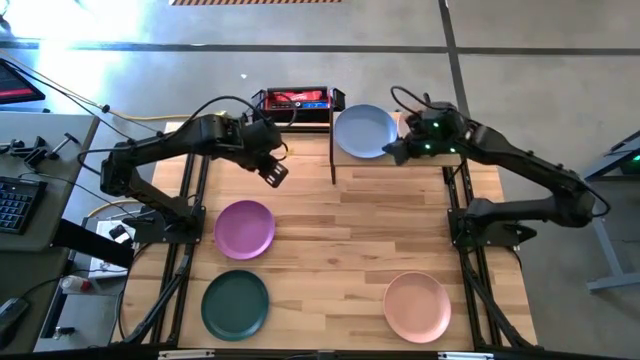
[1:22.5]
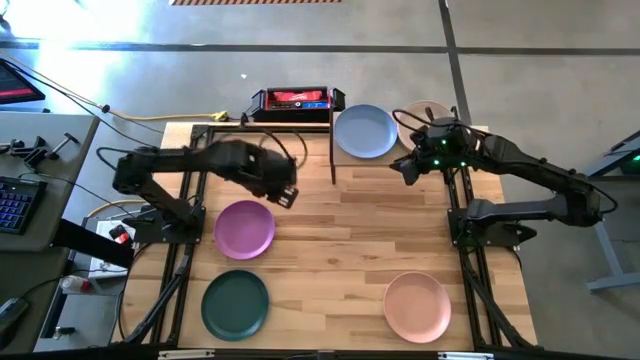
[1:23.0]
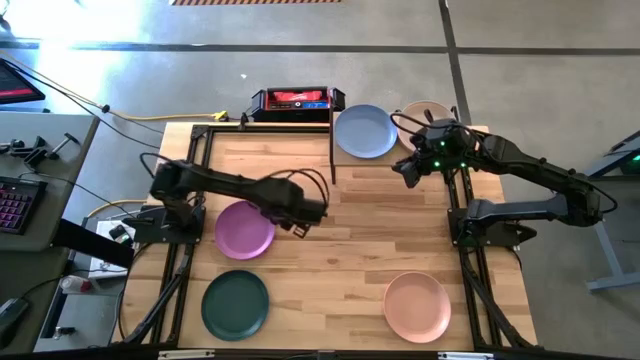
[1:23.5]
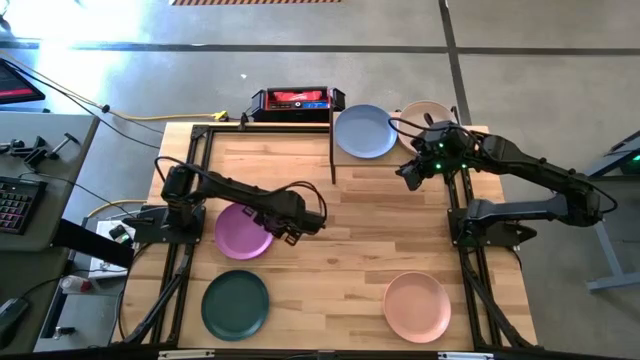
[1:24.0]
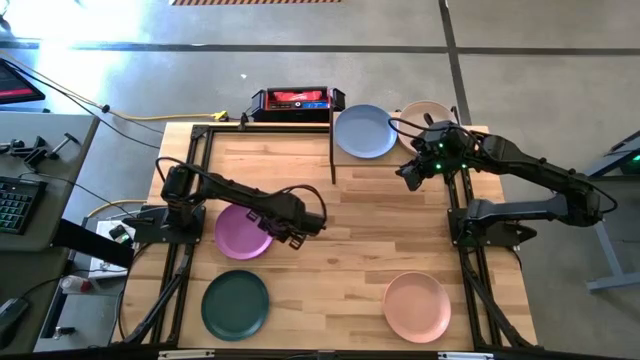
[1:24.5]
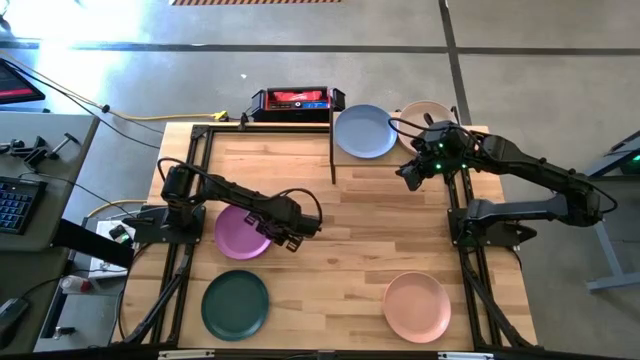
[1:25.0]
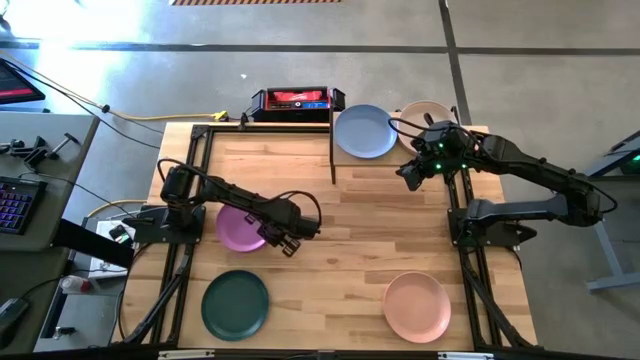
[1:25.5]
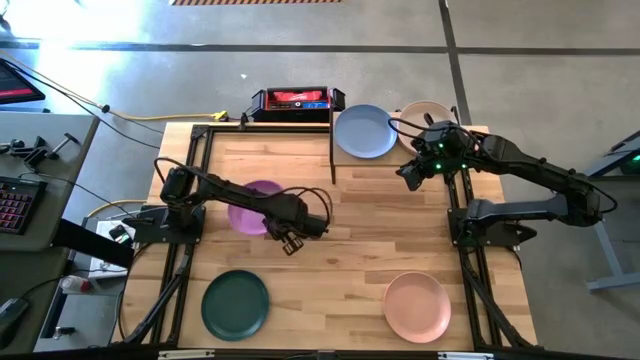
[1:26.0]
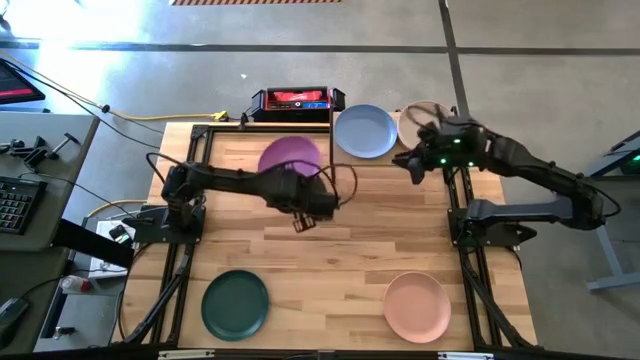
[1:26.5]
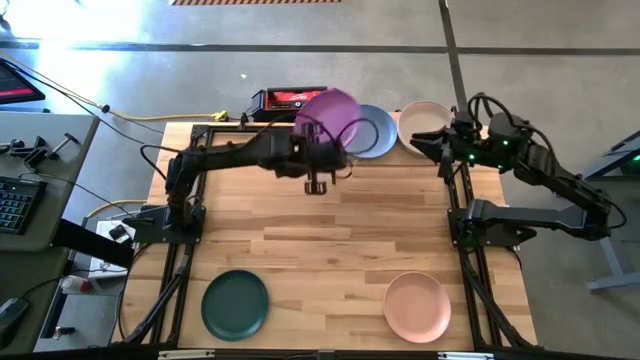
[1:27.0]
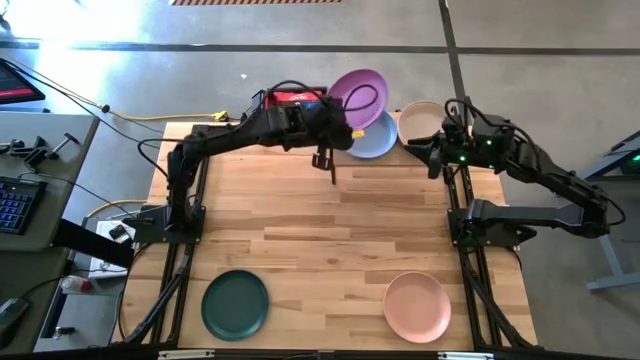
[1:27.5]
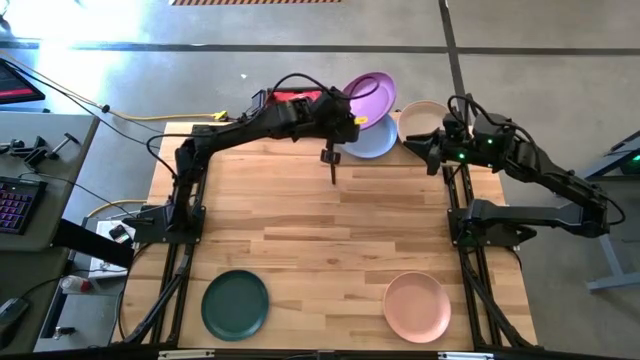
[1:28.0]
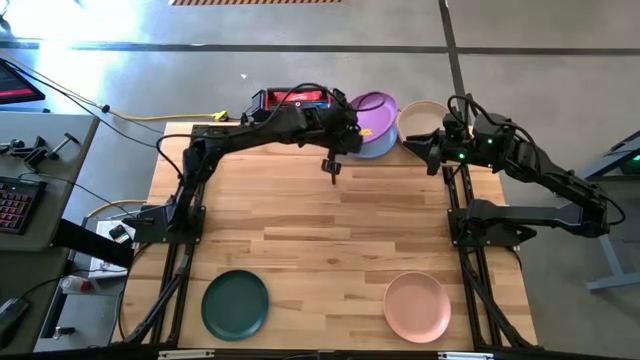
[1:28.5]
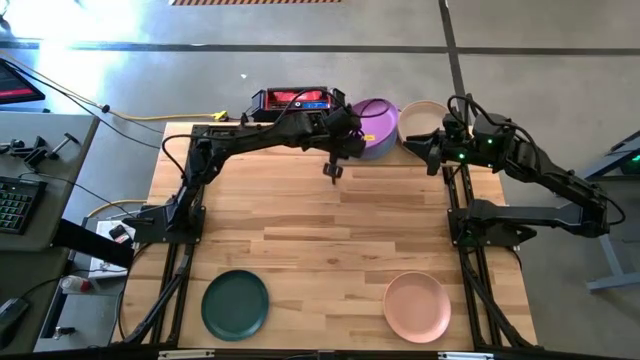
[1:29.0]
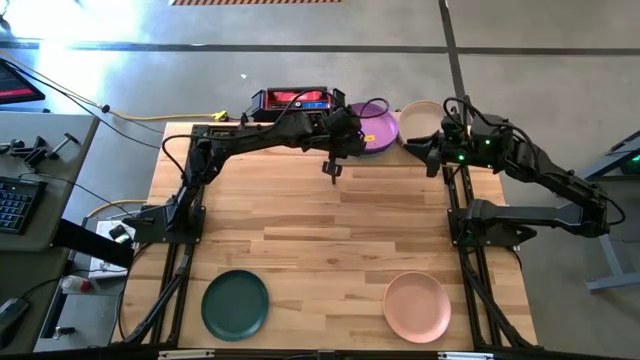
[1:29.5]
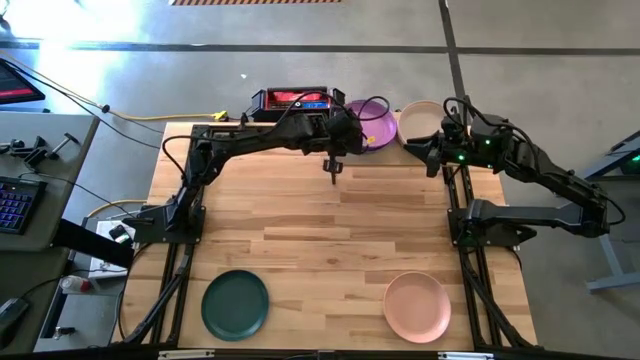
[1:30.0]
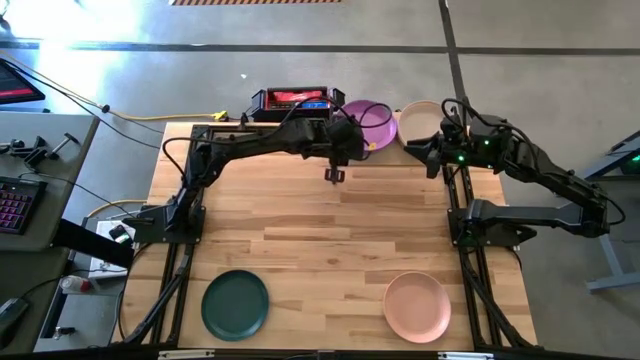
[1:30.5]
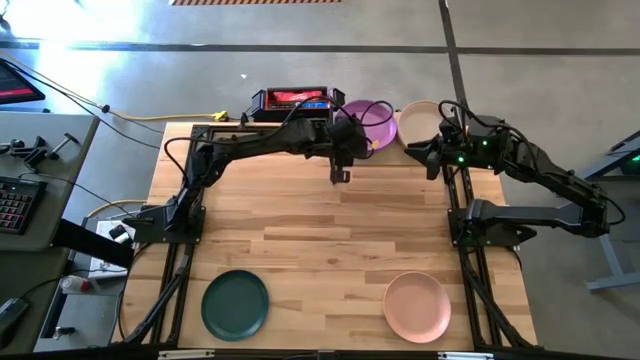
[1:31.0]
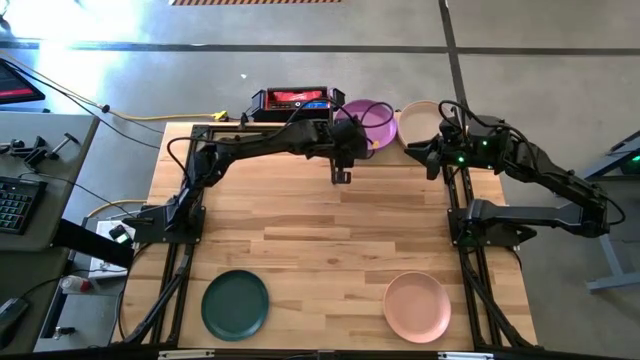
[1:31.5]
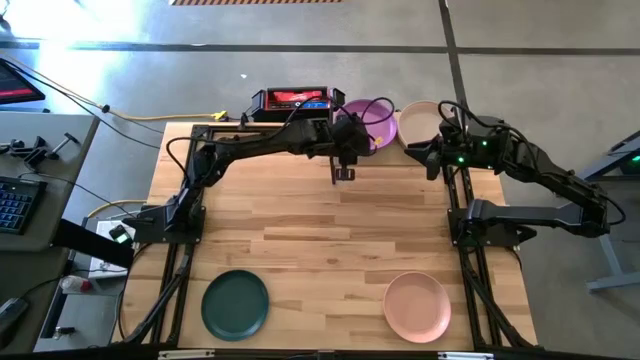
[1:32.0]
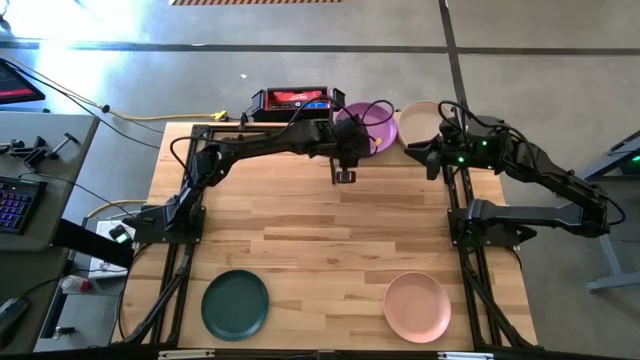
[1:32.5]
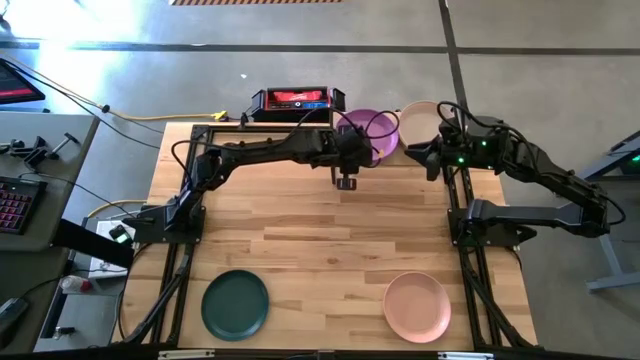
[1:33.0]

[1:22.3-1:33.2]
Task: Place and stack plates onto a shelf
Stack the purple plate on top of the blue stacked plates on the shelf

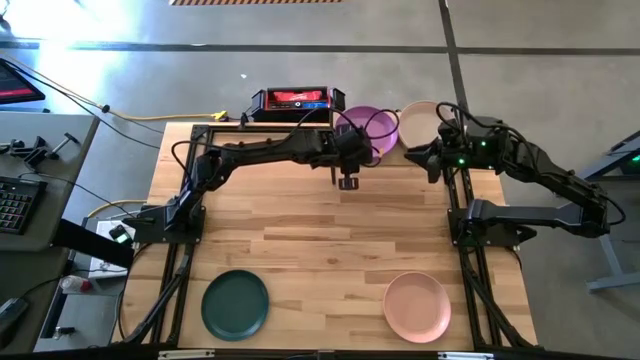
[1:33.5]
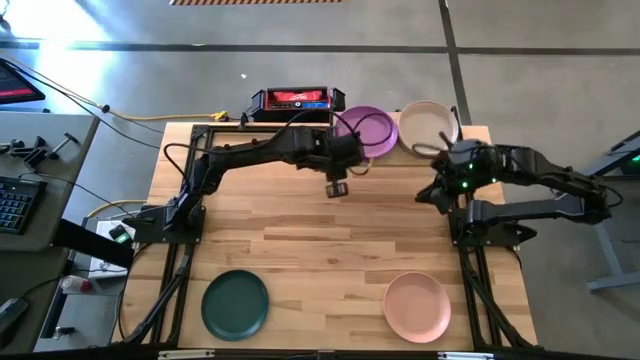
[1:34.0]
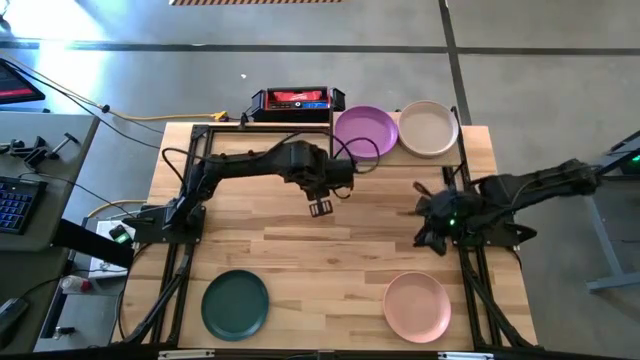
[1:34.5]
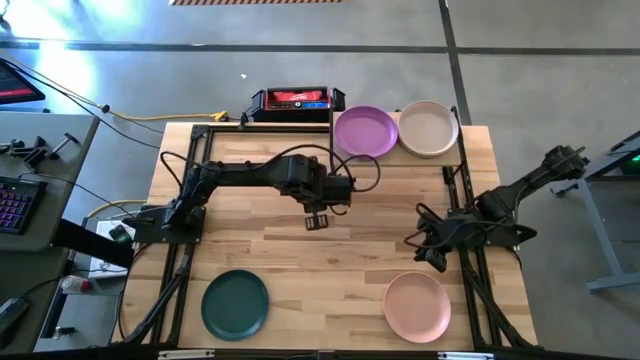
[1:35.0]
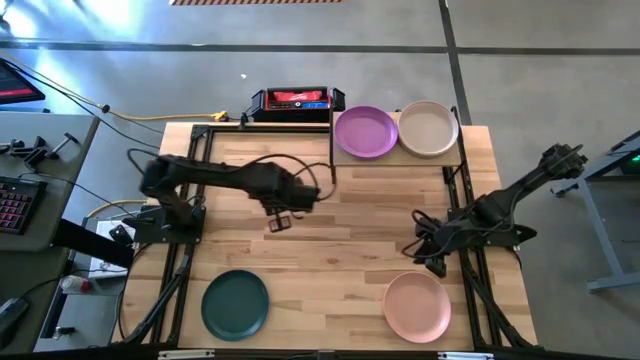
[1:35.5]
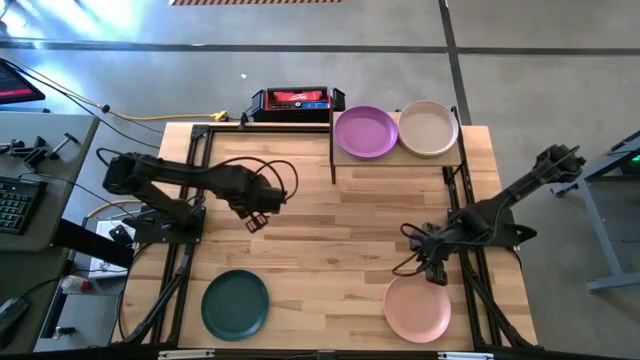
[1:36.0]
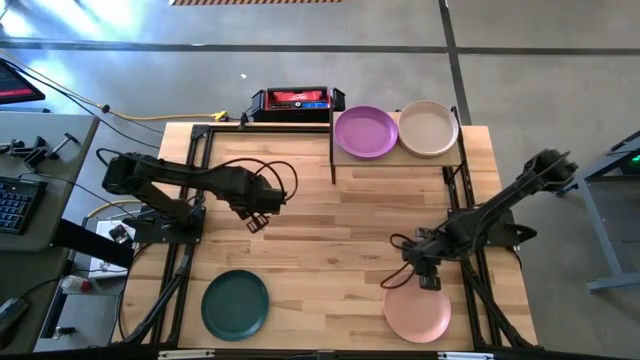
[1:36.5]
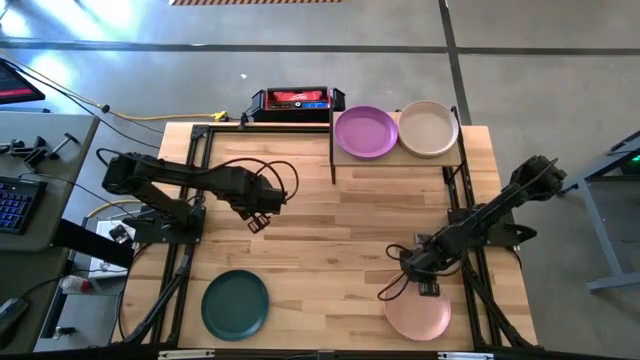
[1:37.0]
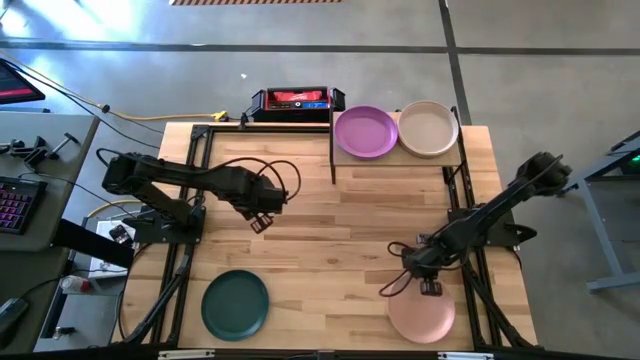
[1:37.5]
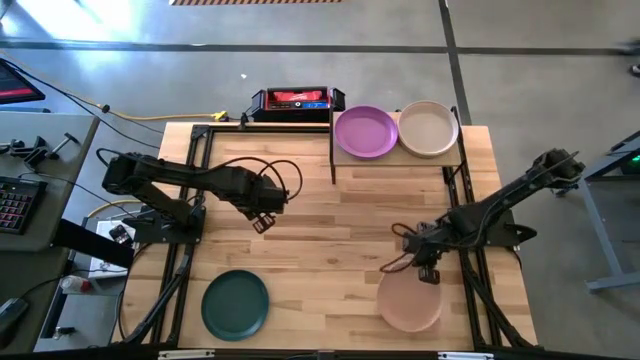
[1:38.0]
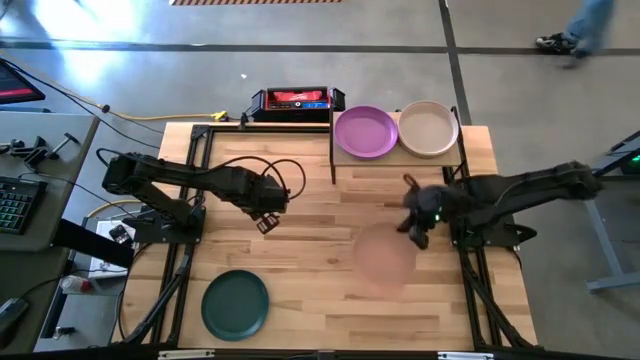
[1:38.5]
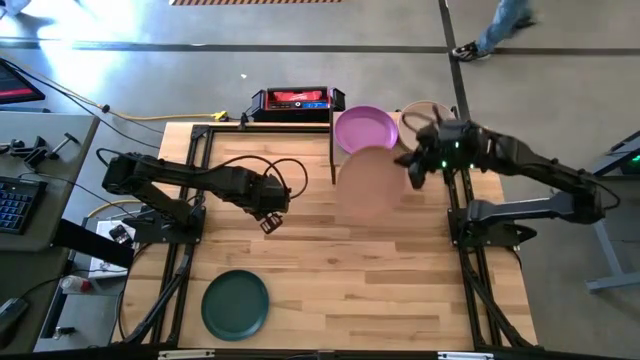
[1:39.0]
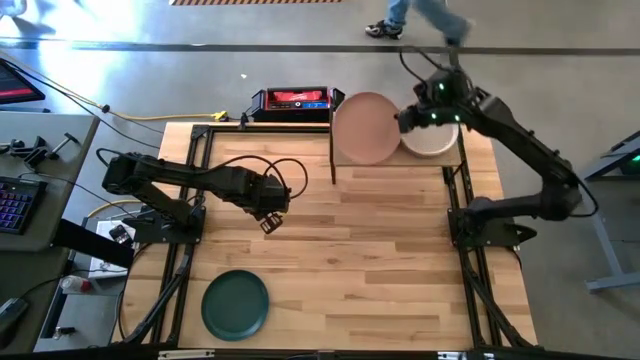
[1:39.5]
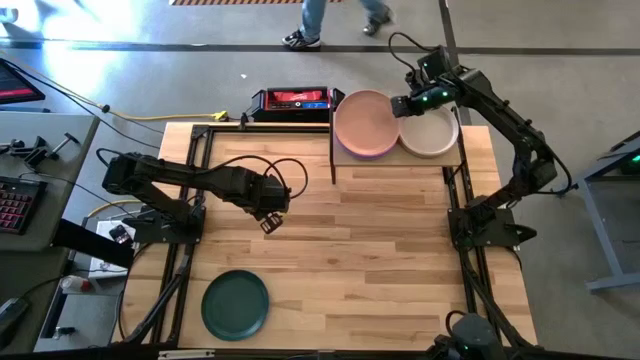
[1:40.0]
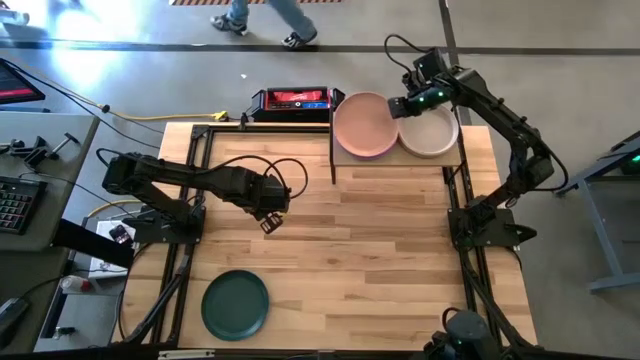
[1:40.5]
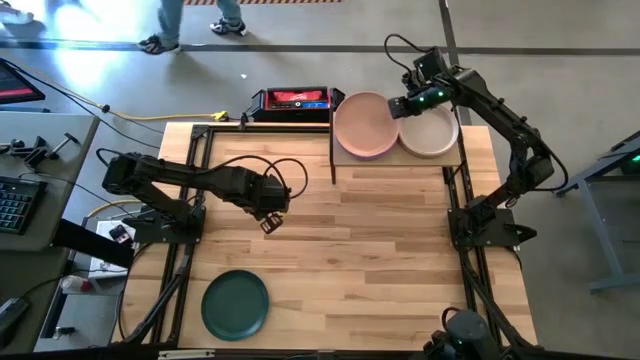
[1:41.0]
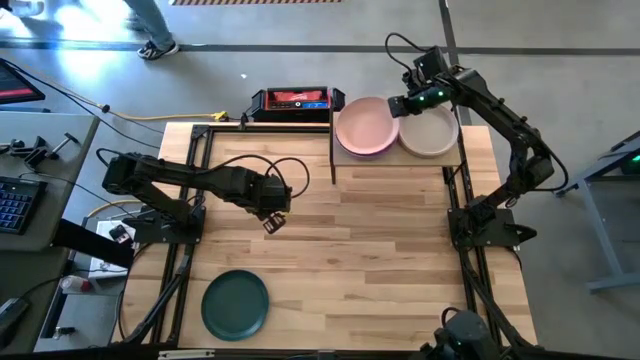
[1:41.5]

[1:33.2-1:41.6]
Stack the orange plate on the purple stacked plates on the shelf

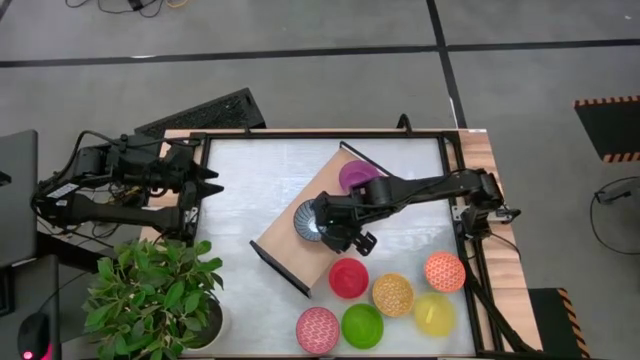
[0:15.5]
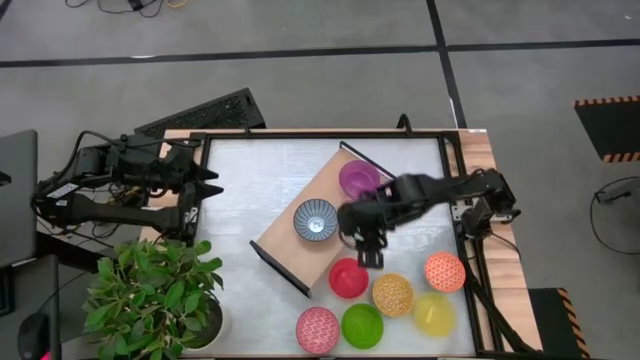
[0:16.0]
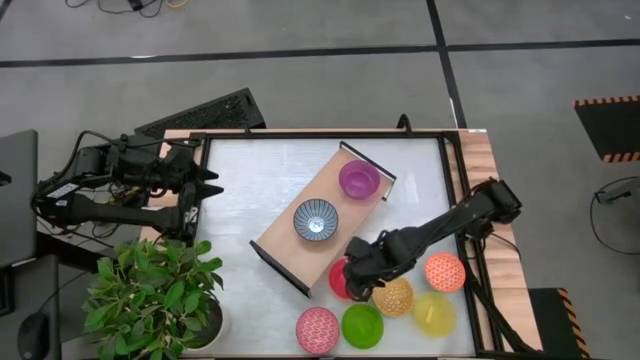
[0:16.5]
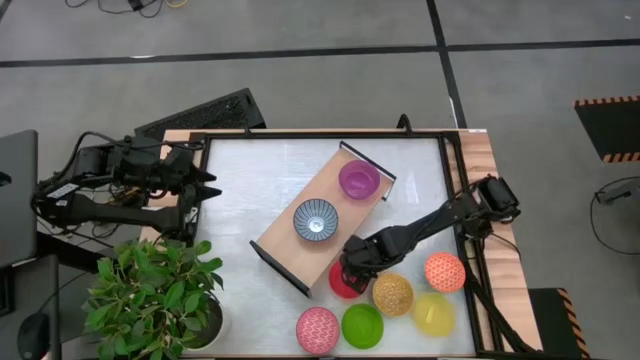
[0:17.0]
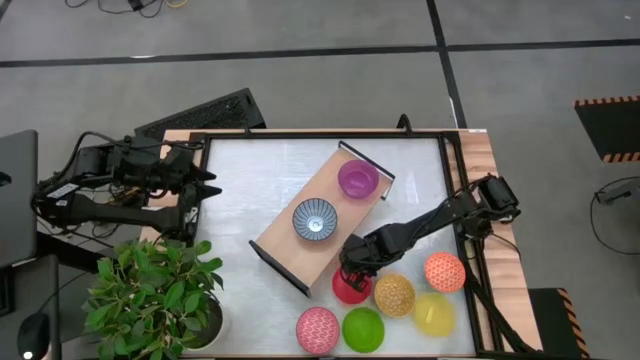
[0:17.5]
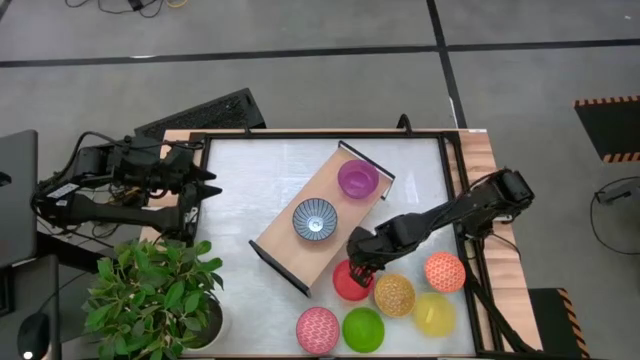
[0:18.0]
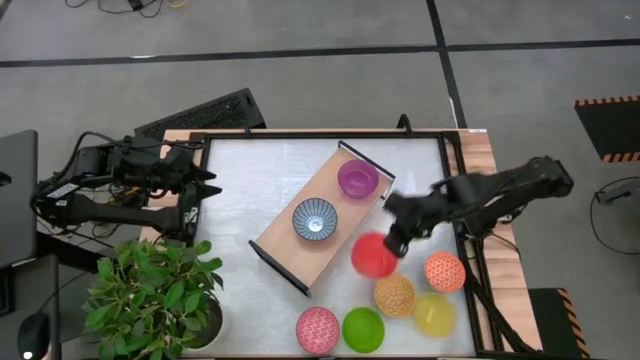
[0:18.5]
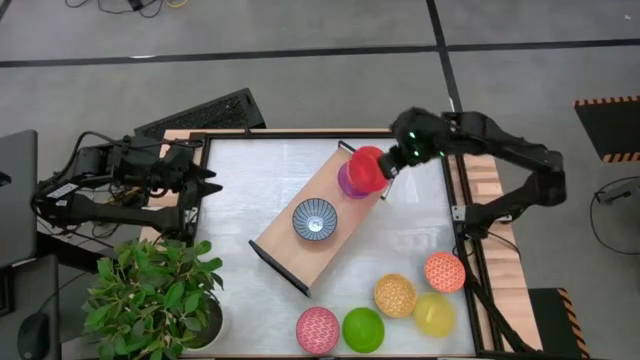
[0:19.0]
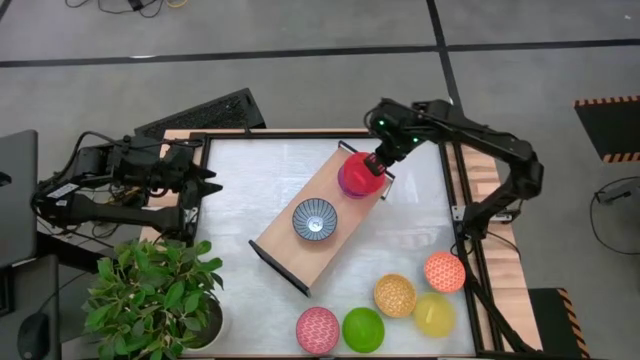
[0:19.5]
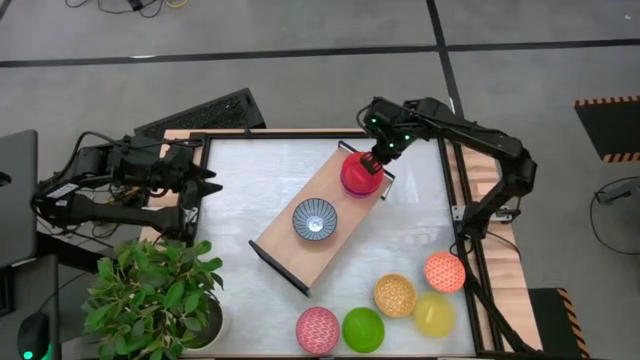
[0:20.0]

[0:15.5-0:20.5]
Task: Place and stack bowls onto a shelf
Stack the orange bowl on top of the purple bowl on the shelf
